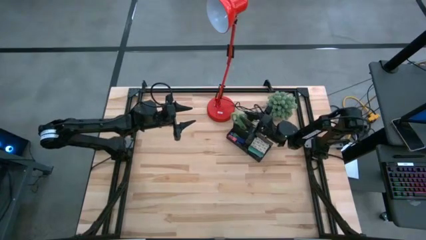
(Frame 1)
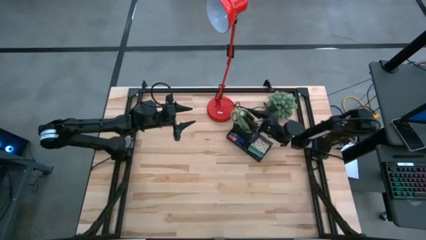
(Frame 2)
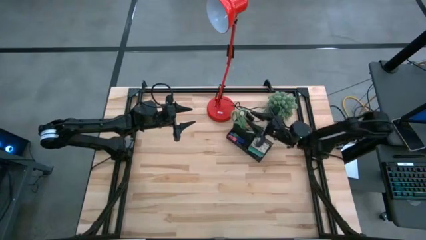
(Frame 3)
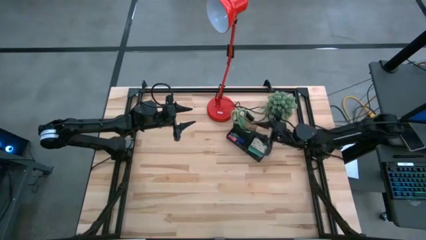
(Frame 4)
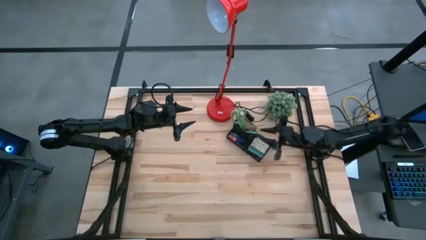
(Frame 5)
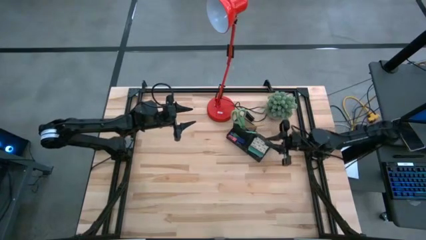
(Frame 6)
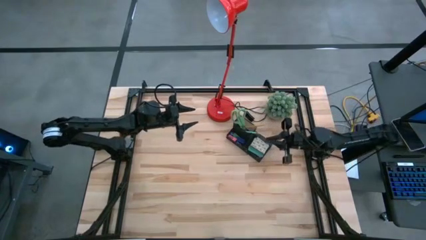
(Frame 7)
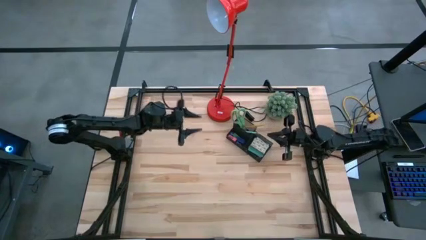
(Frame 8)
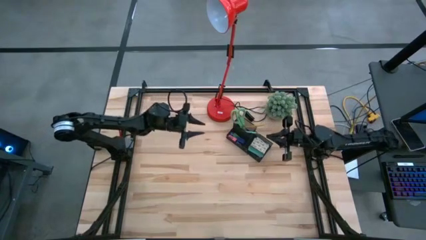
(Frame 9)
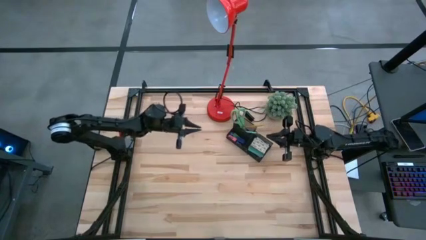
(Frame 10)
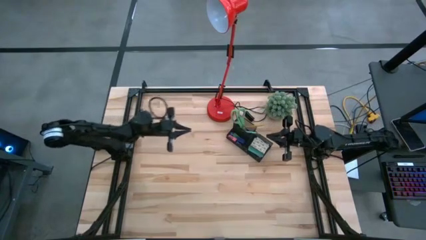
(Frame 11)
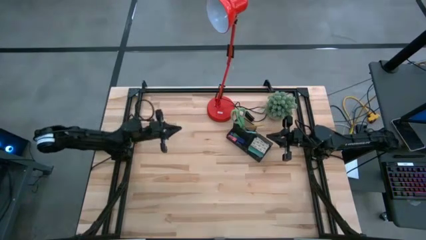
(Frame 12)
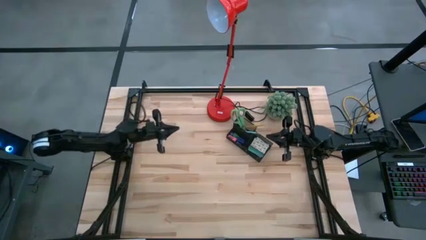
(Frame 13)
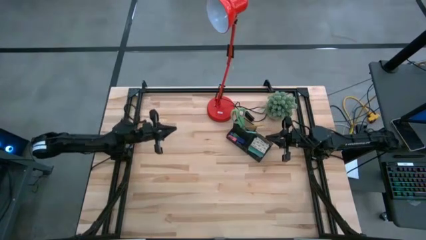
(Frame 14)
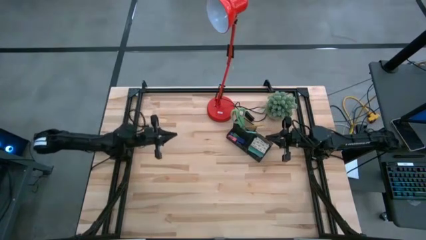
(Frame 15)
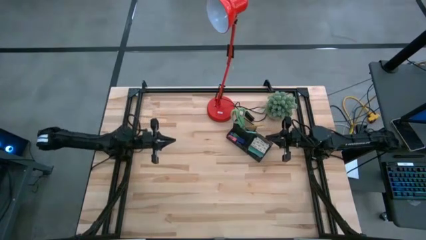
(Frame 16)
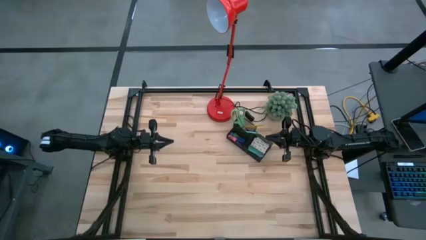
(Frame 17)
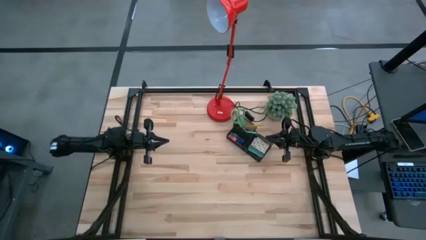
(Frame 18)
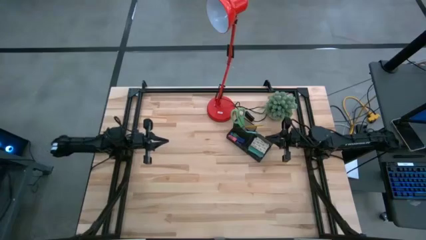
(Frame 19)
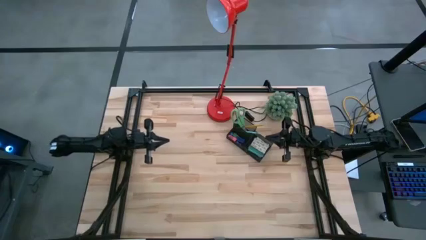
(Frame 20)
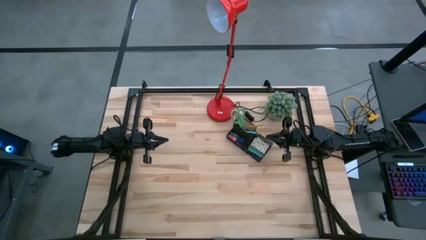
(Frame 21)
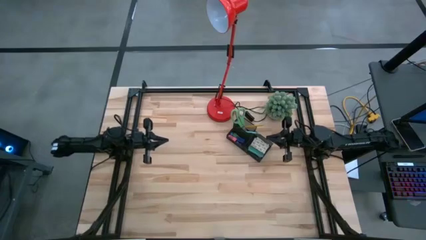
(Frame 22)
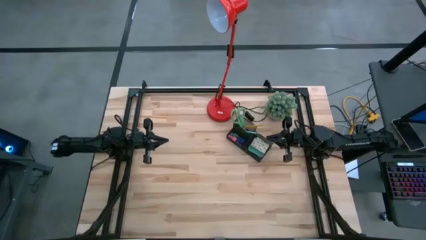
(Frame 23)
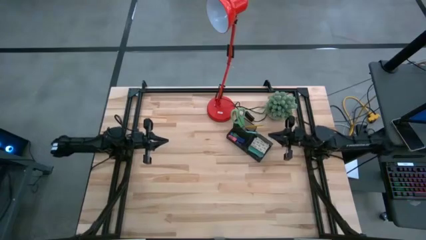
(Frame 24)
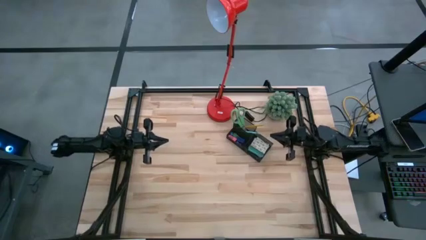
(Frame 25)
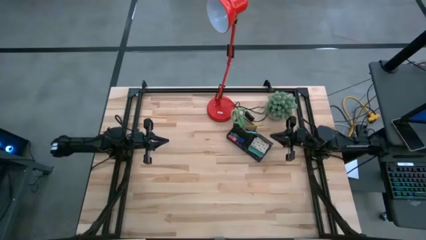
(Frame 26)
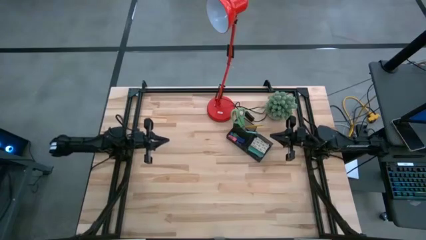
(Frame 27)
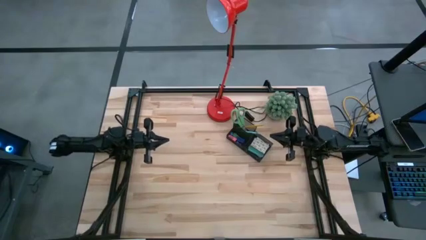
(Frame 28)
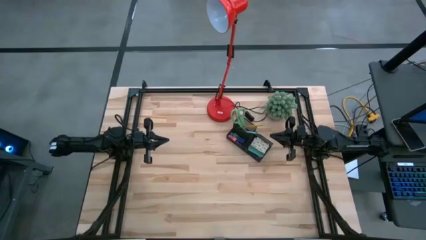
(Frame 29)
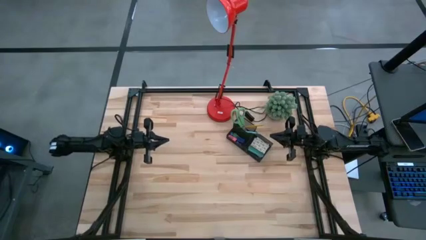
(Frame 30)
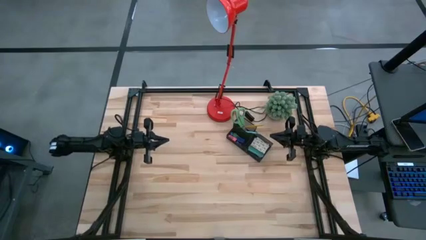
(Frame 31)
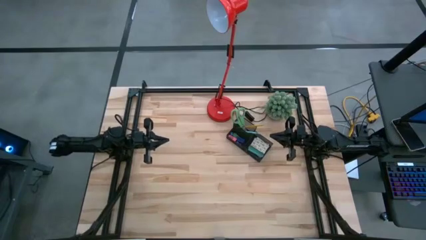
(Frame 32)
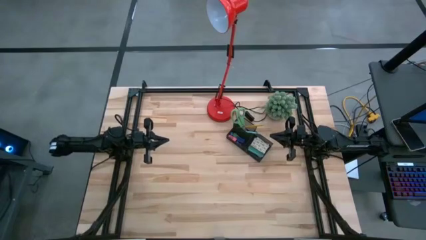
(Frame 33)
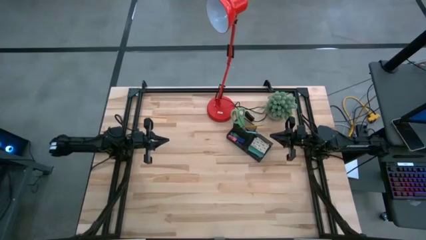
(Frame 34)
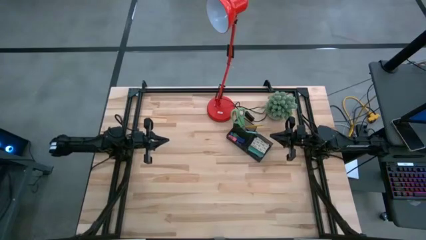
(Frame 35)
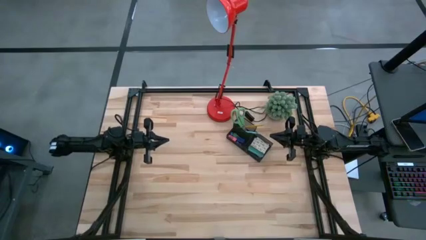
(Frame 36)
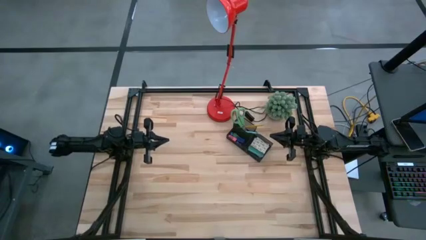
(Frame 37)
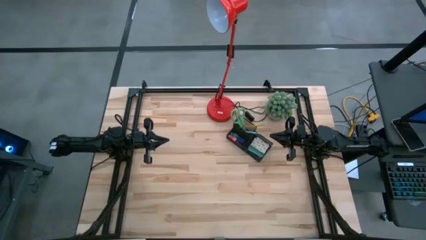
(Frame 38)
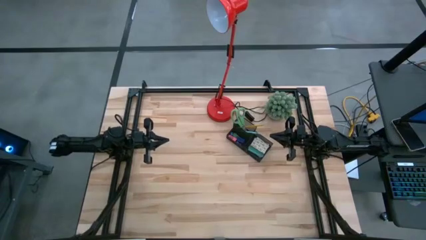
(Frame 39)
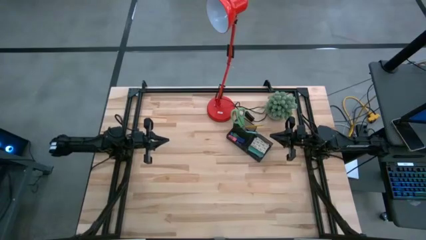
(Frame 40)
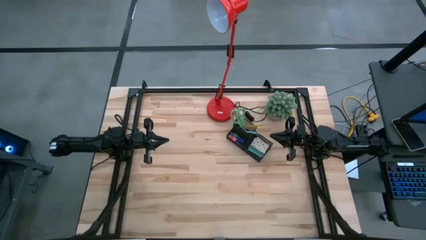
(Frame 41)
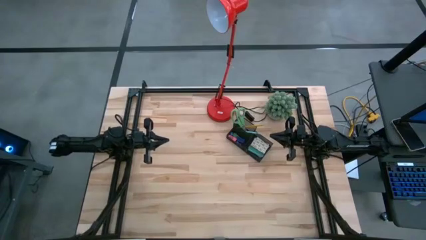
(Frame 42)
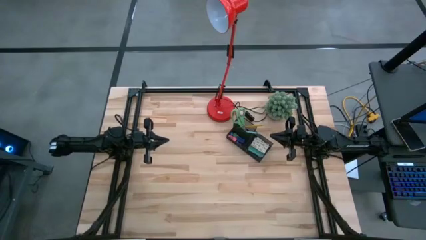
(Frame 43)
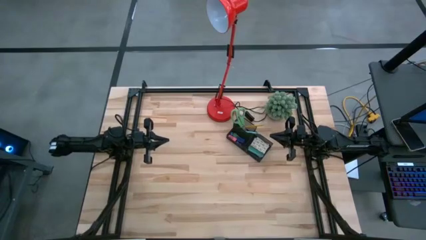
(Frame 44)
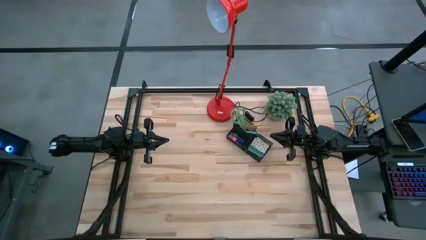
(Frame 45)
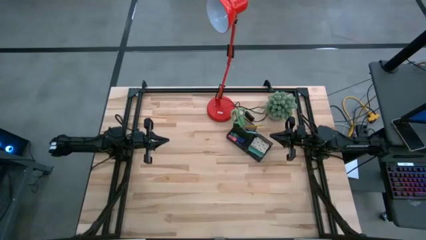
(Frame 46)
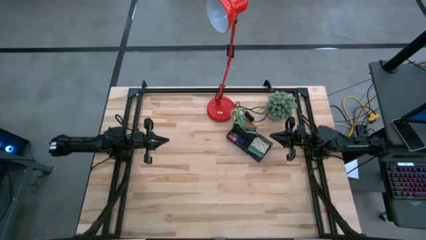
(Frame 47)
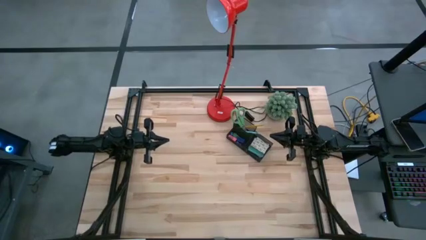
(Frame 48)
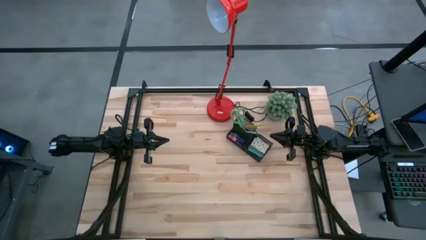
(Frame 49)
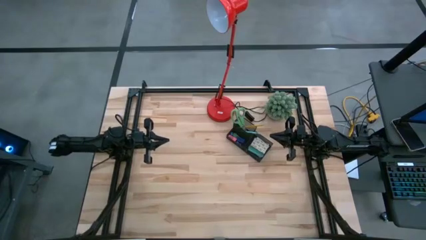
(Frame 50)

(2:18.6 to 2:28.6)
Task: Pick and place office supplies into organizer
Return to Home Position

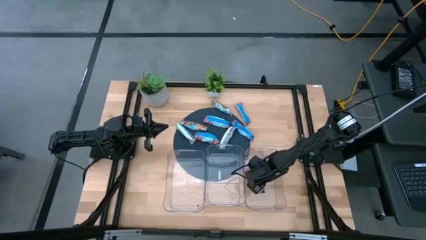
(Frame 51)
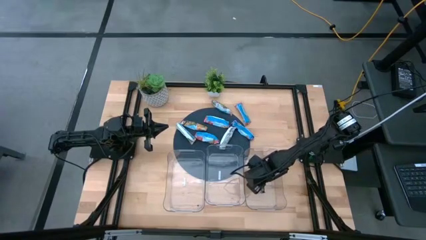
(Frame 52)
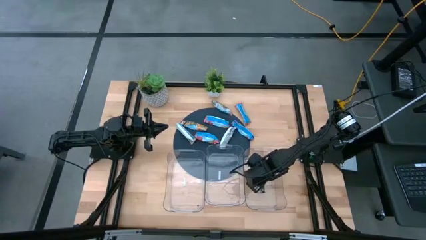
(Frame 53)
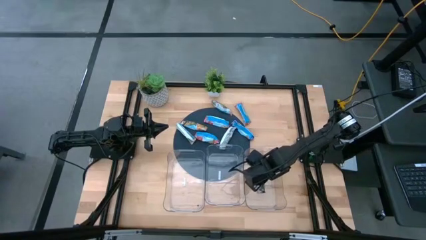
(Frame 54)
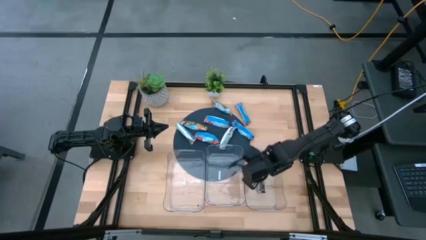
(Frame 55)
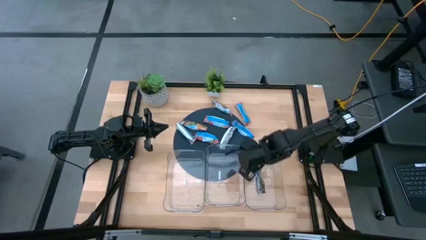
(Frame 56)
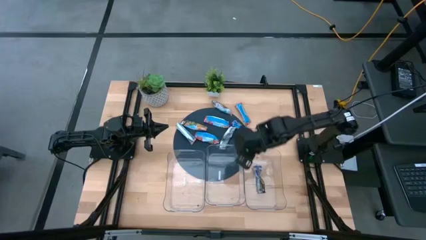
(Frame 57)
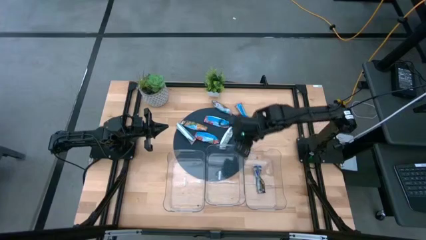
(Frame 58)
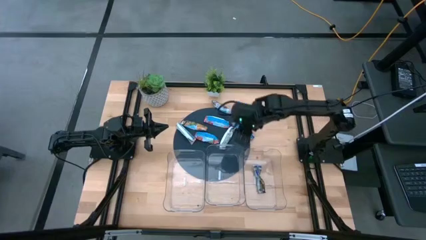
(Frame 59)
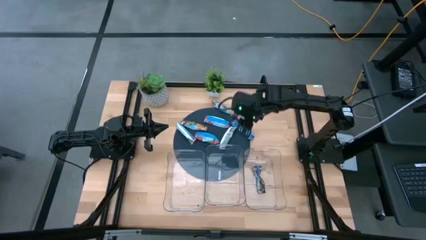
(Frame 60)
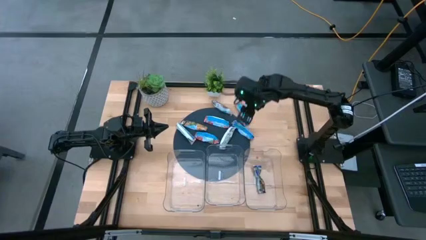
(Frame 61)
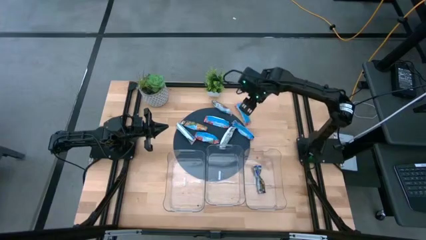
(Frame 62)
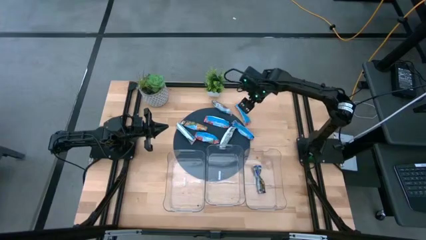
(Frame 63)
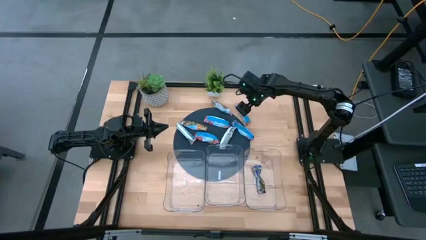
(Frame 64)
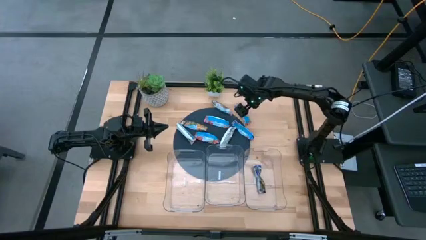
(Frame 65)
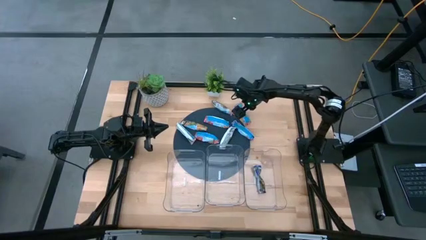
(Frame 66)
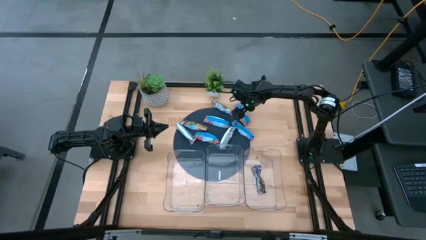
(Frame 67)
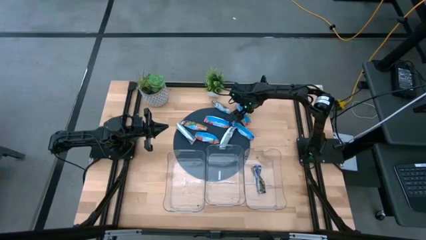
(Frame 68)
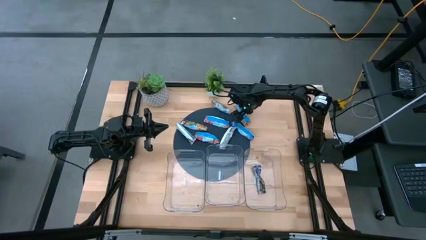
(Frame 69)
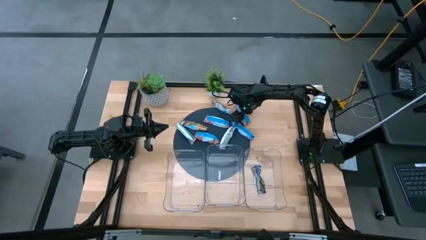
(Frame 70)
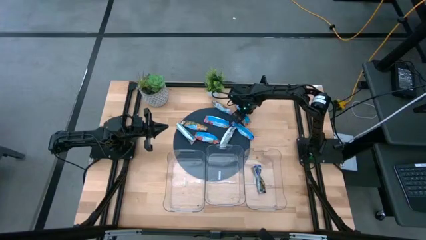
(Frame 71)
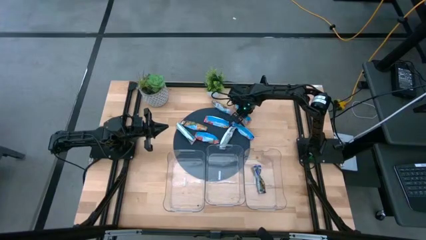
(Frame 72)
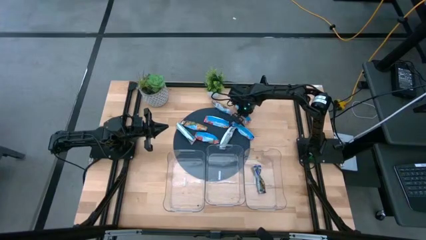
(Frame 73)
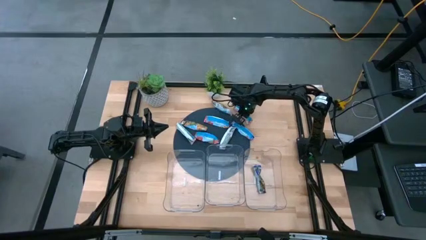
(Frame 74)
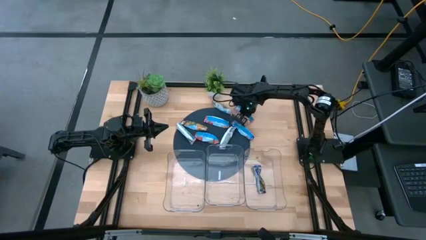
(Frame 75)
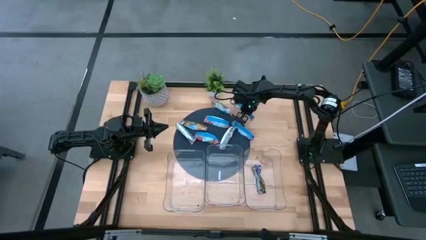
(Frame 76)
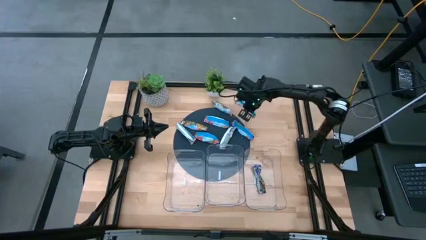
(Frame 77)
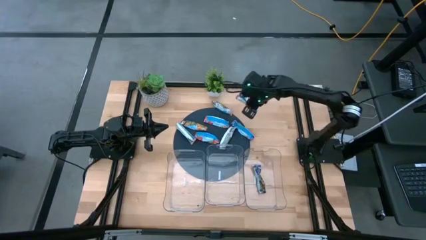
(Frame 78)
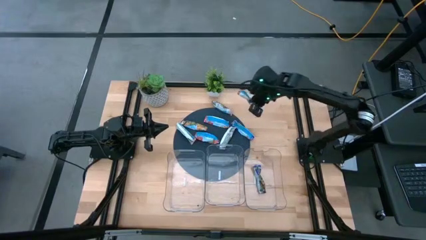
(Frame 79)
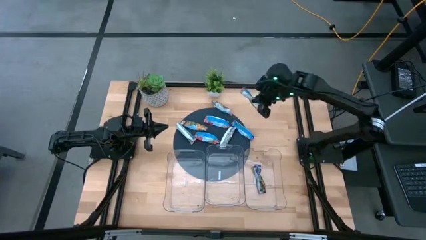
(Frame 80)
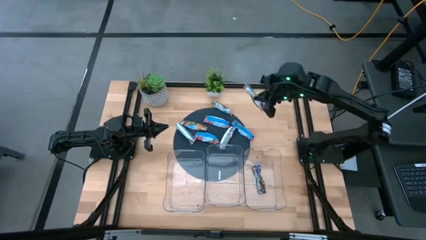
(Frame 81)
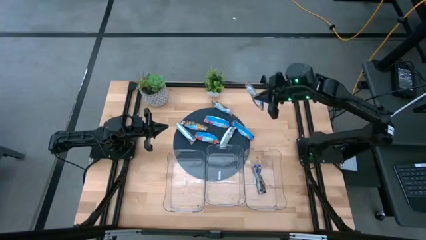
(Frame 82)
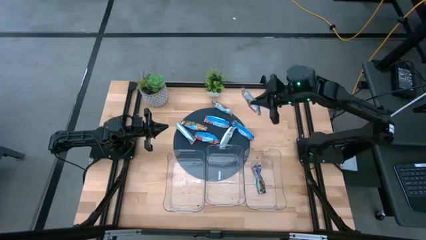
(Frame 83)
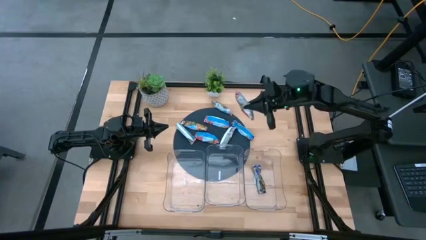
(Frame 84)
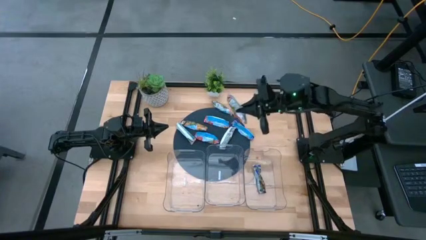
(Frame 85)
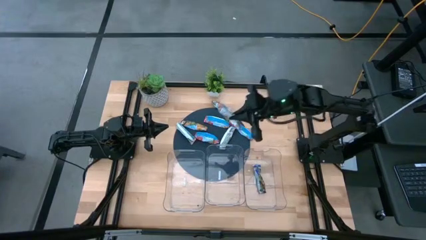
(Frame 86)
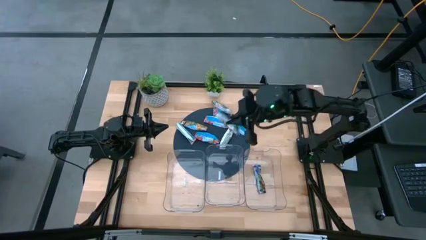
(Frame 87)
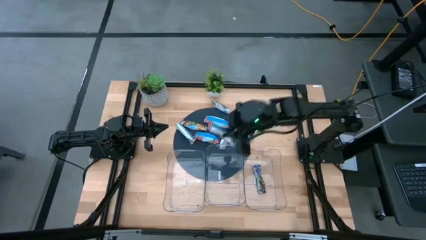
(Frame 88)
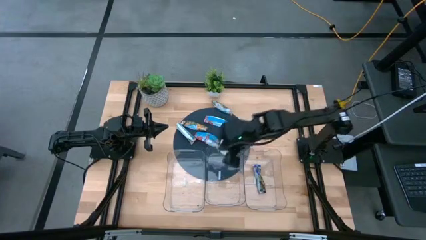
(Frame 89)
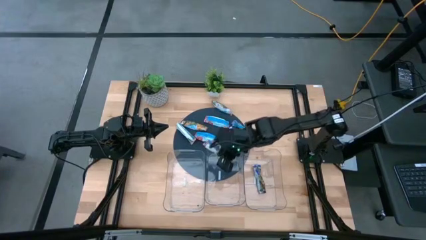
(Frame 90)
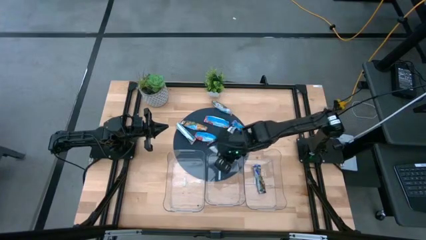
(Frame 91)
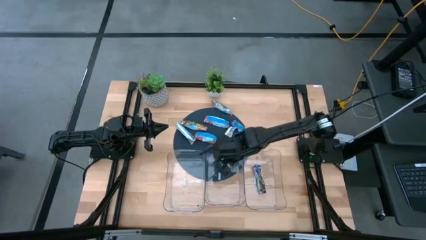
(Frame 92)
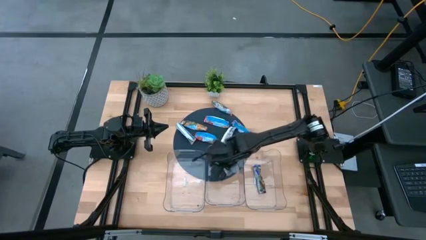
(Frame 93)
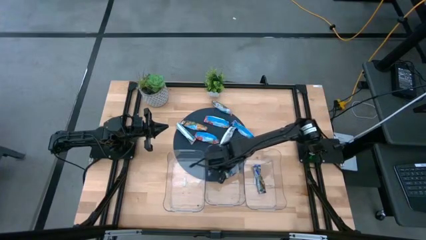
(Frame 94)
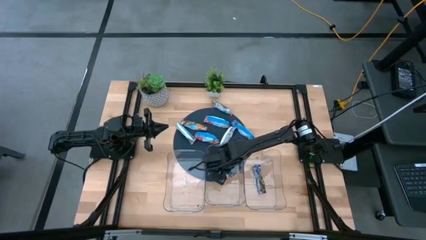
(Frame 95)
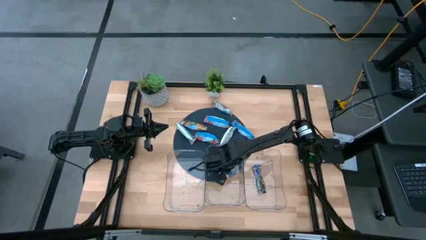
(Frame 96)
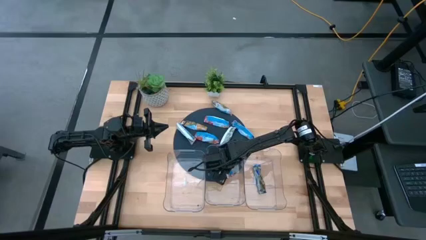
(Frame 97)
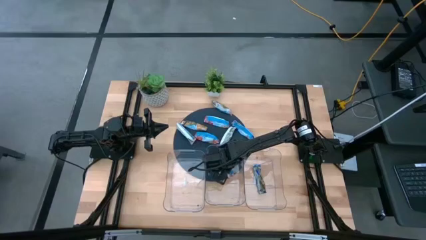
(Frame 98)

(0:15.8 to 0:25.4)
Task: Pick and place Granola Bars by type
Put the red granola bar into the middle transparent bin
